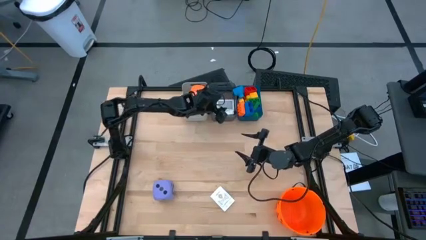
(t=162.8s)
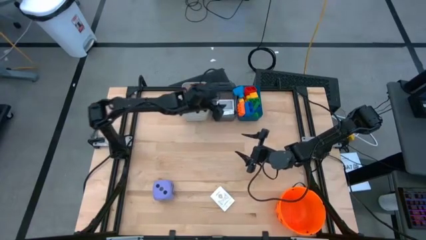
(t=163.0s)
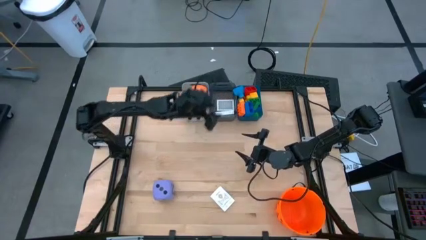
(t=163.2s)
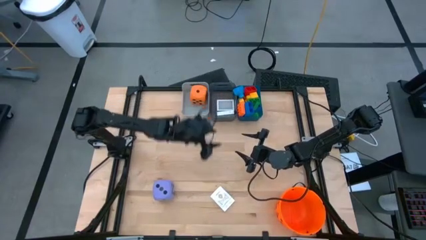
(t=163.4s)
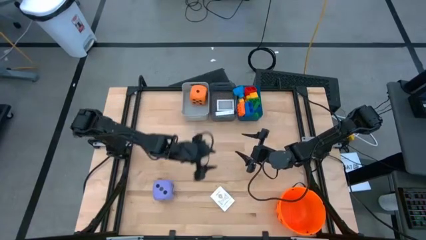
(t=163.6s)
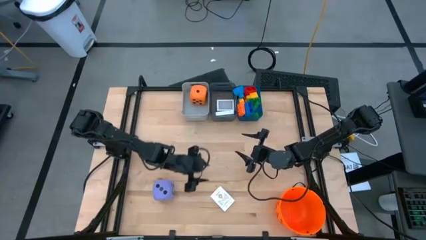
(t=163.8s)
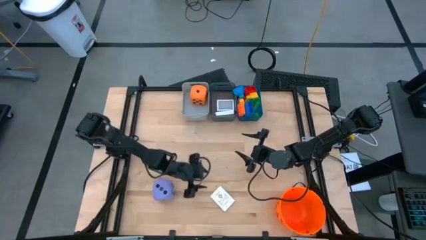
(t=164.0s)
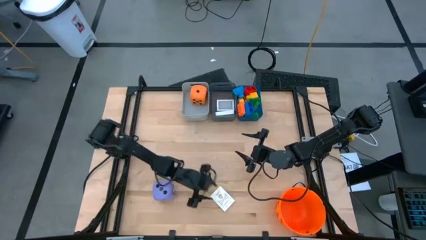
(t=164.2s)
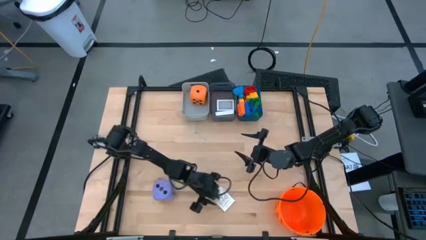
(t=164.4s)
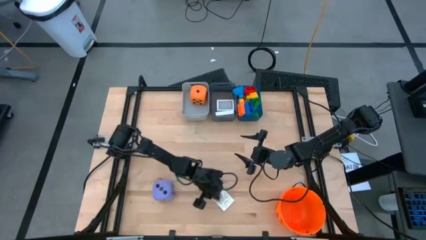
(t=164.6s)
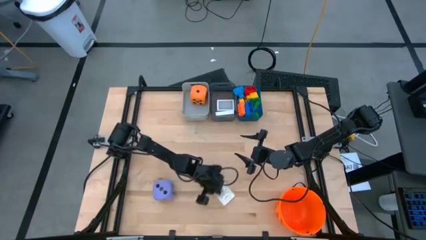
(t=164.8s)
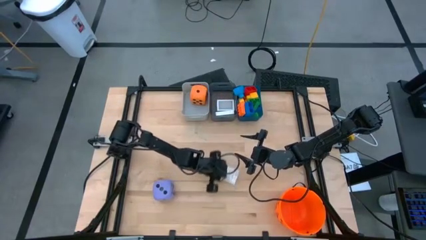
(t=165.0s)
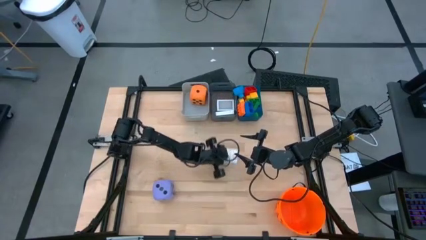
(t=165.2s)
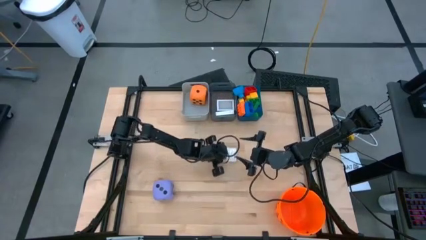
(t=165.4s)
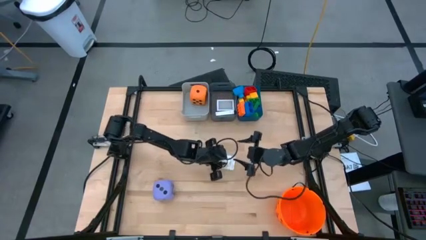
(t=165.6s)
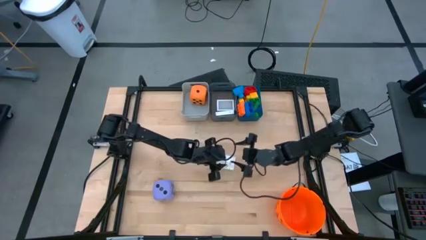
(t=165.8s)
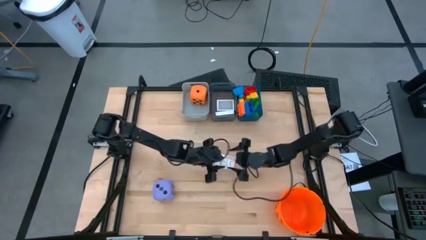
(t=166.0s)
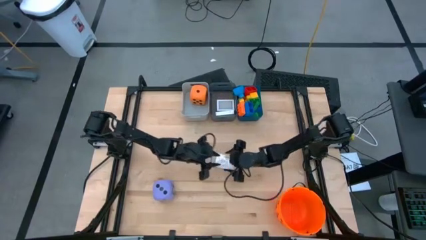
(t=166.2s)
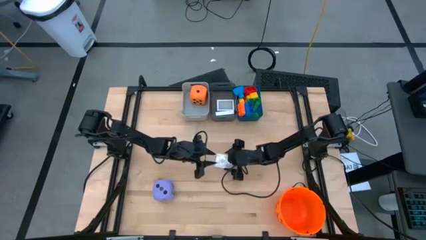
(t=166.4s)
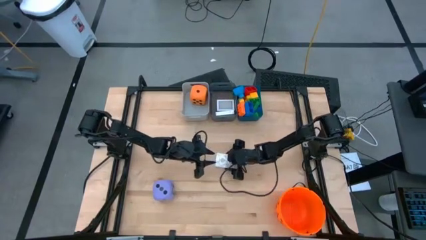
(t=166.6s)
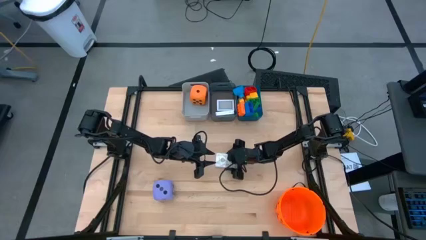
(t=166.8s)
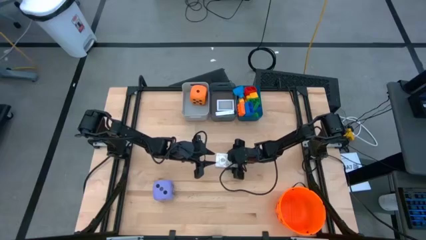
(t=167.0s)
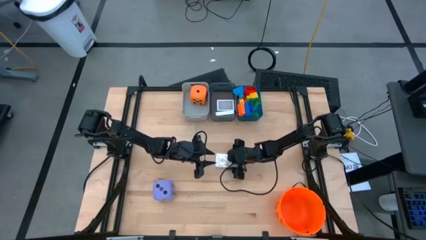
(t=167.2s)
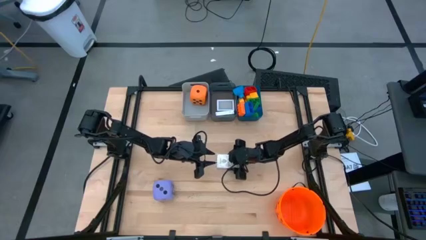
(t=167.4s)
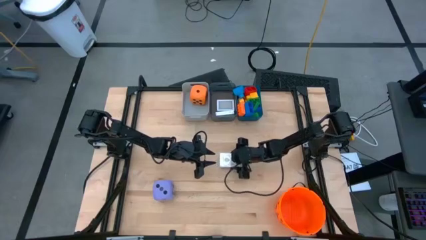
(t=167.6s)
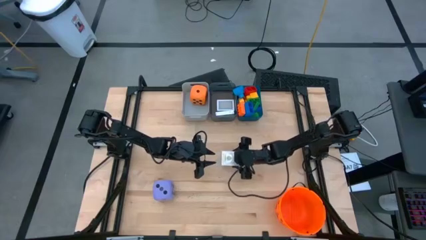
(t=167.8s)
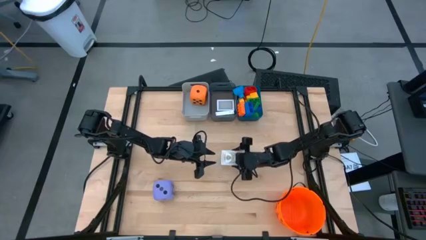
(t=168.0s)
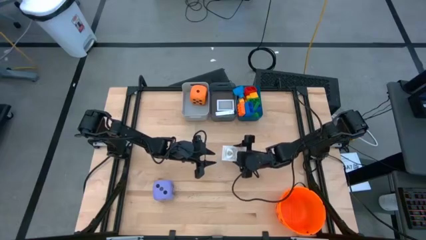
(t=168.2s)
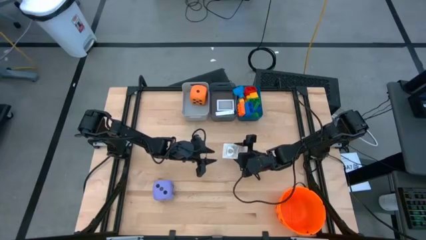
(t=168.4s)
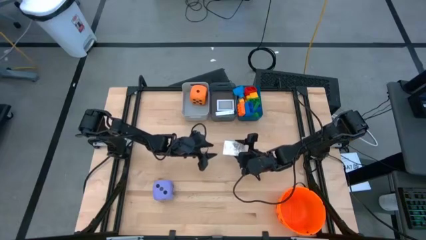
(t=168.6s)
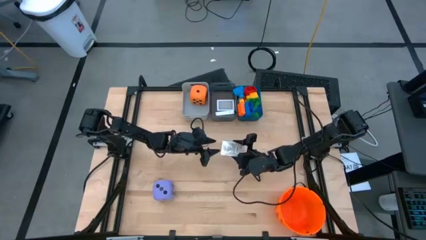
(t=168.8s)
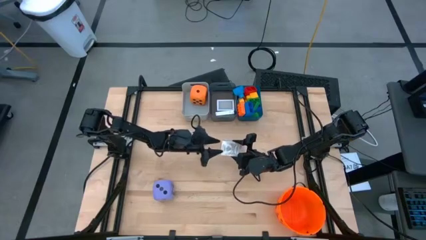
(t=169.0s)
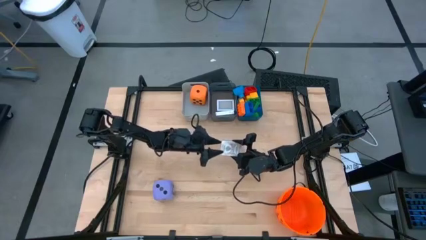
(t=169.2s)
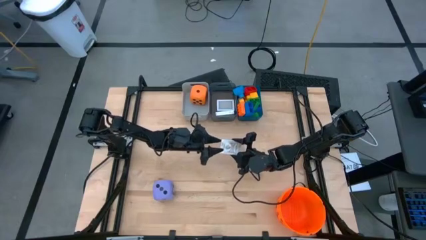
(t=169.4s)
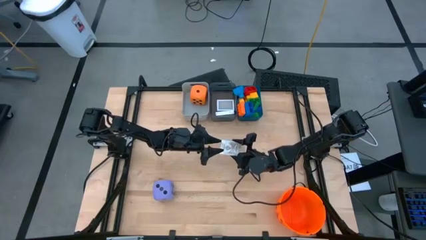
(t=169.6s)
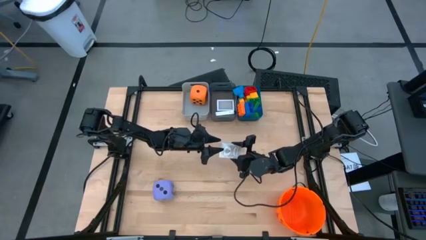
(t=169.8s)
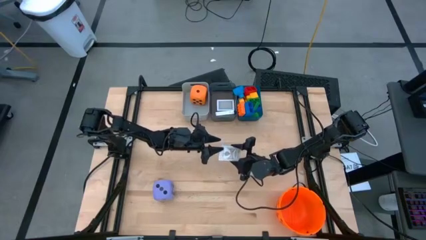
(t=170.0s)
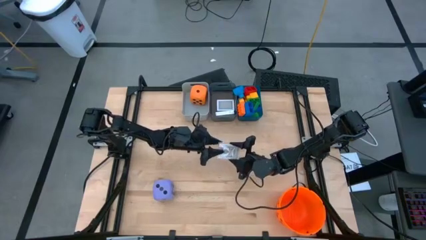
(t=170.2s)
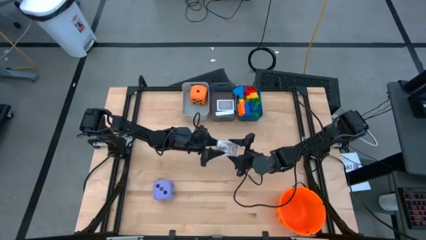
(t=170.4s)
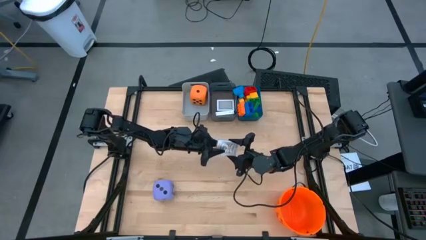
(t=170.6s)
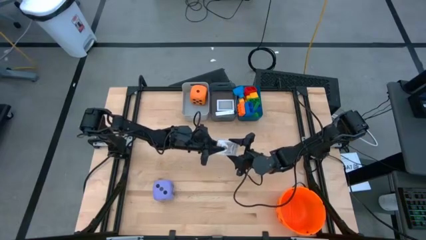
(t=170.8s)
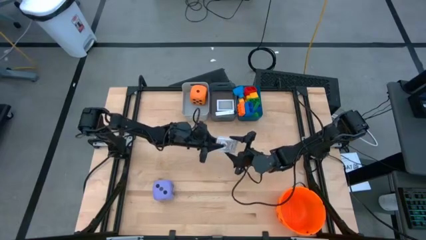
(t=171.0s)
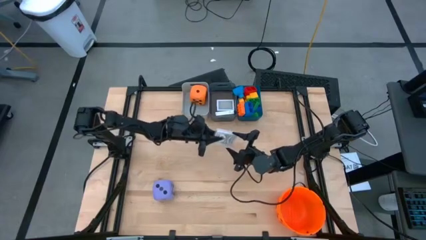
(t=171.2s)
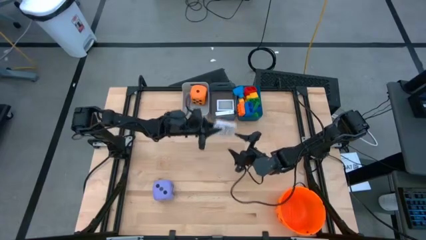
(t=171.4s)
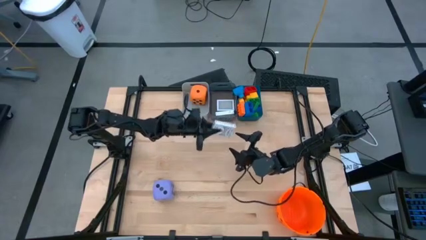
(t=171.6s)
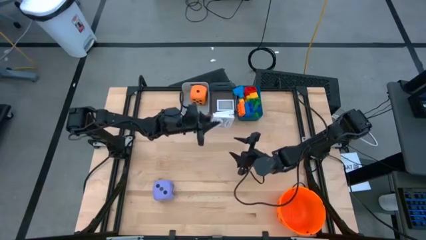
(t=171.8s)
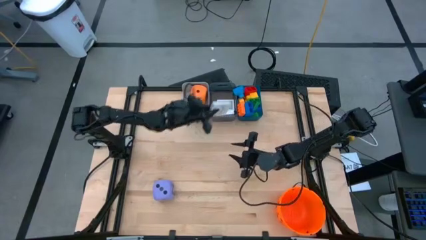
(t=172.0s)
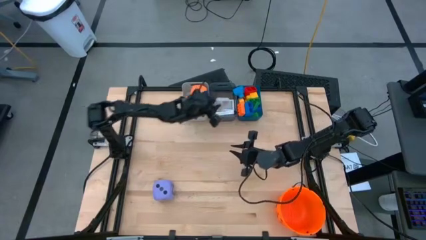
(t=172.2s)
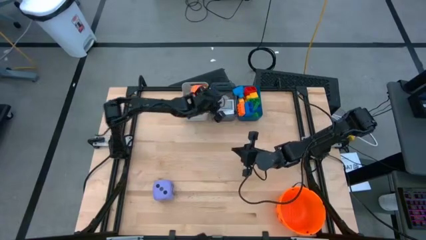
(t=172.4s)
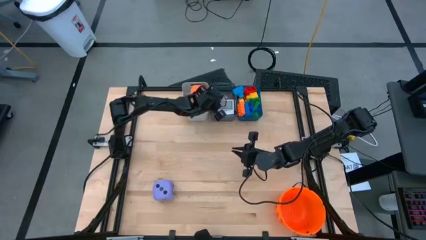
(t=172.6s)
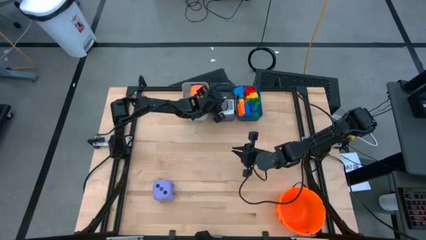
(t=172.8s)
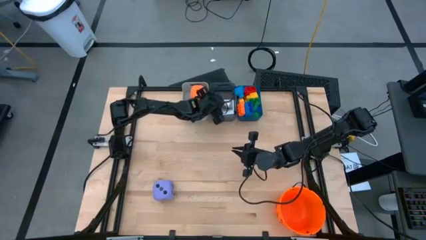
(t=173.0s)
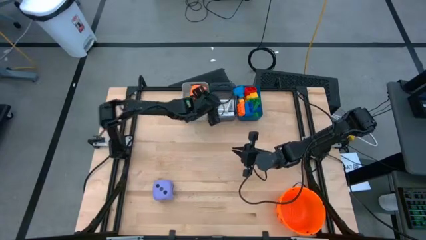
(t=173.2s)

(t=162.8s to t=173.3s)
Task: Pick & Place Toys
Put the gold playing cards into the black bin

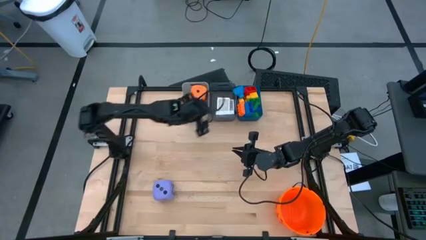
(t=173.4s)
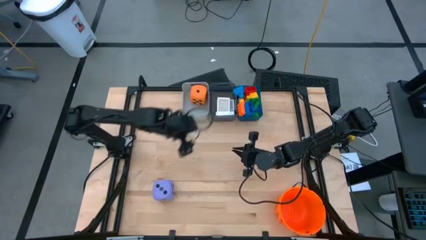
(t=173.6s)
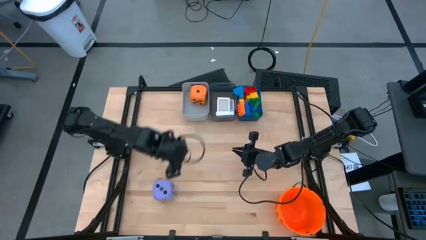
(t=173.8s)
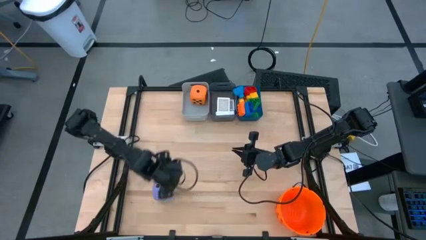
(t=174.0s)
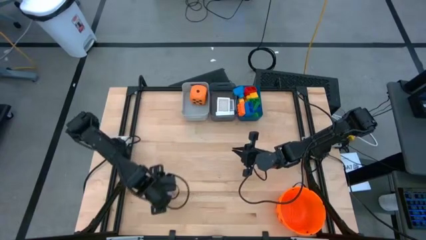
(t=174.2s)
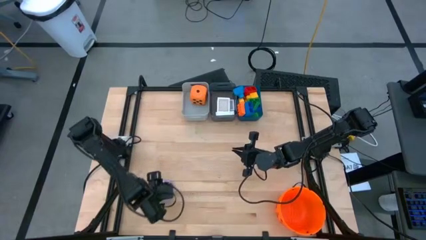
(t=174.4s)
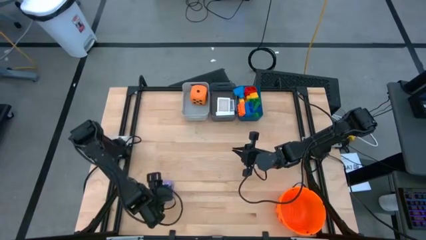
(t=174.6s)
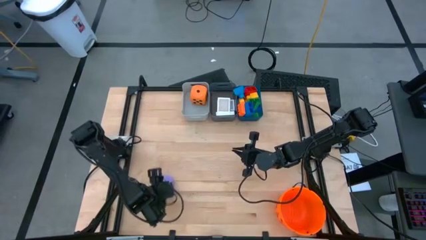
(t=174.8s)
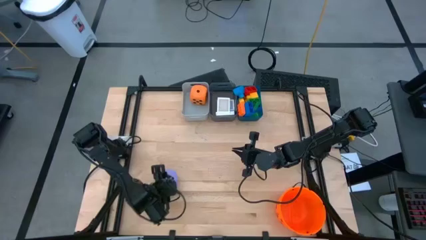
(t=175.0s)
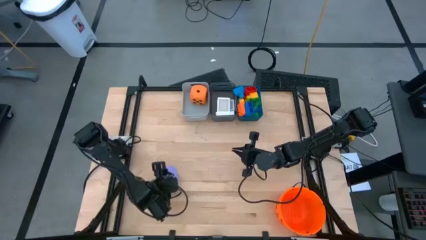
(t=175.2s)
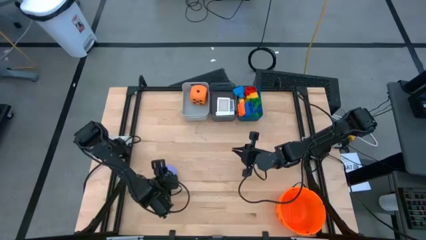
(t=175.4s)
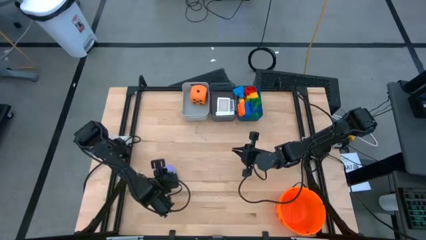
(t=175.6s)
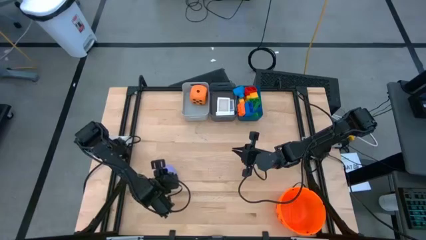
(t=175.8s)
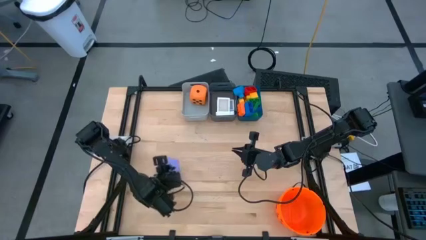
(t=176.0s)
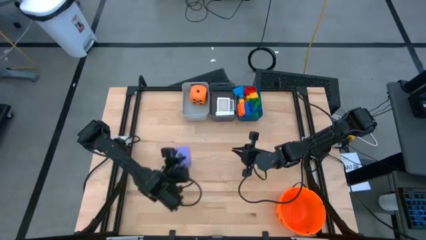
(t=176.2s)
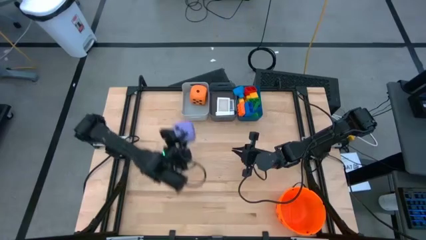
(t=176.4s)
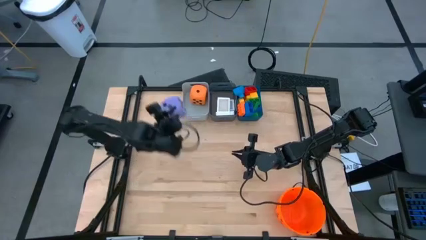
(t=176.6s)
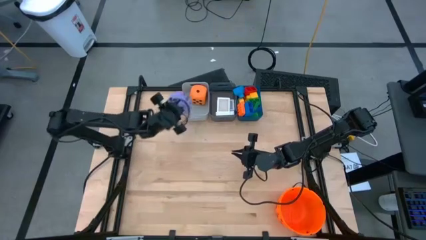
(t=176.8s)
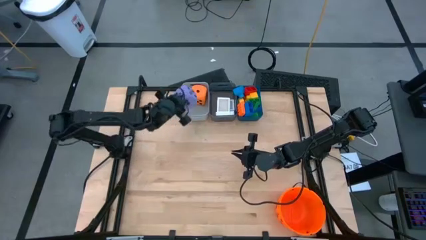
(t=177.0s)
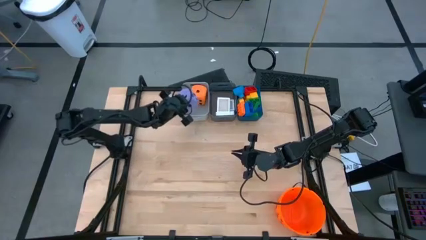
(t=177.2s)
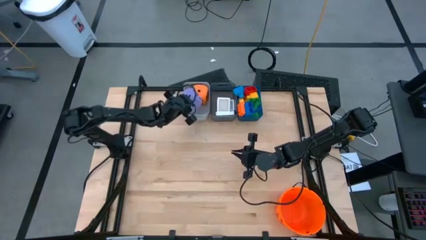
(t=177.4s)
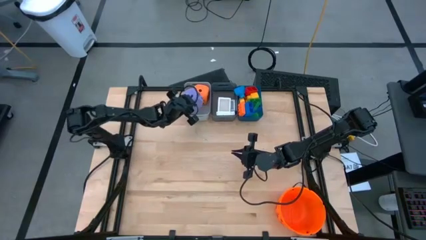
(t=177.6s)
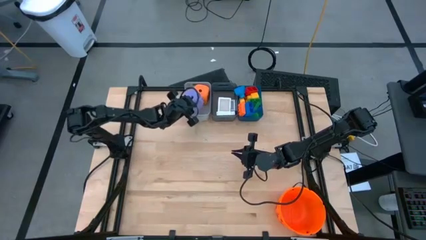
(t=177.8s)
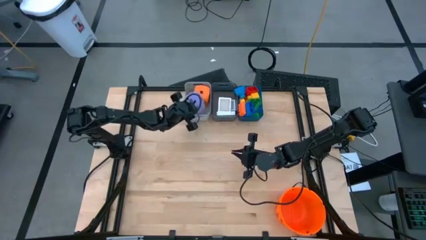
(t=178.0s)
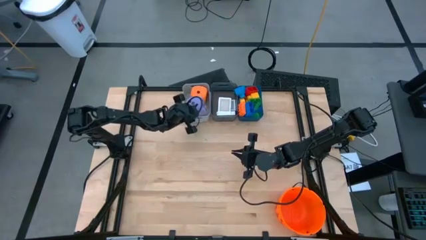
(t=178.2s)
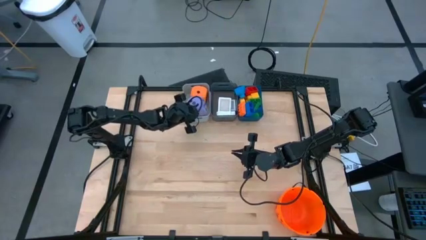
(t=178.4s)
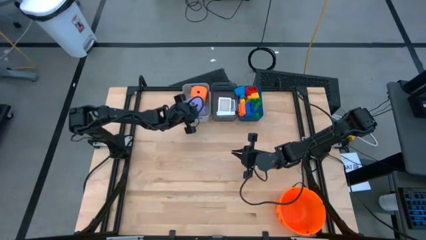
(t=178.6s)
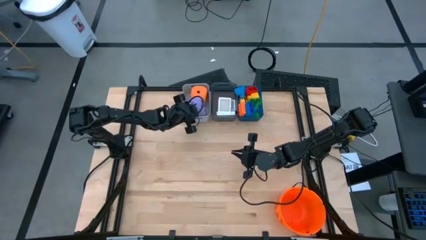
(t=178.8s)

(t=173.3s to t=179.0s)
Put the purple die into the white bin
